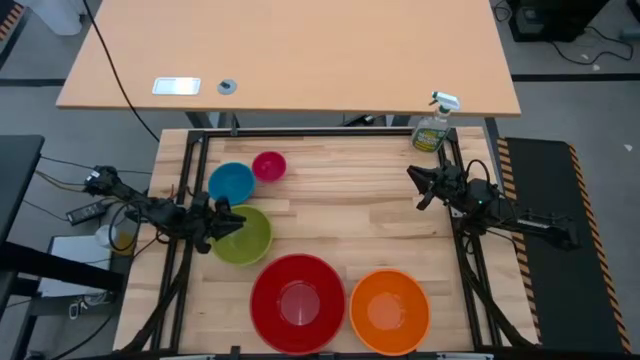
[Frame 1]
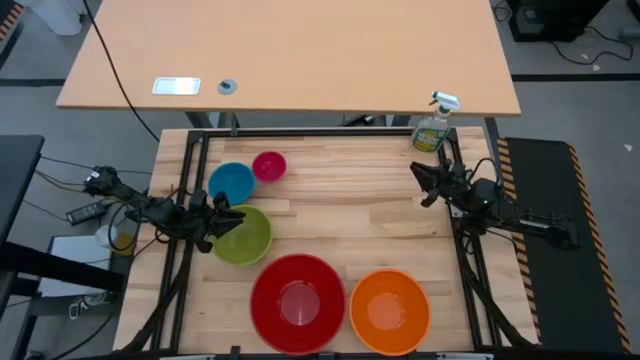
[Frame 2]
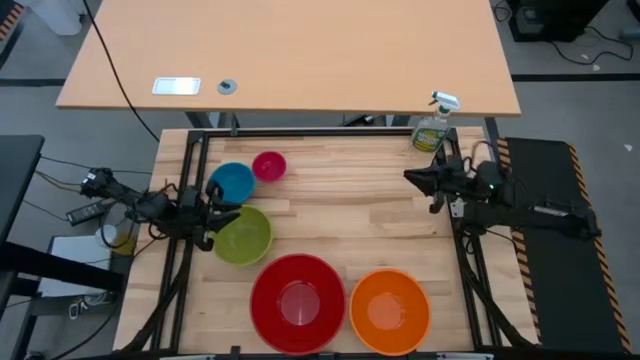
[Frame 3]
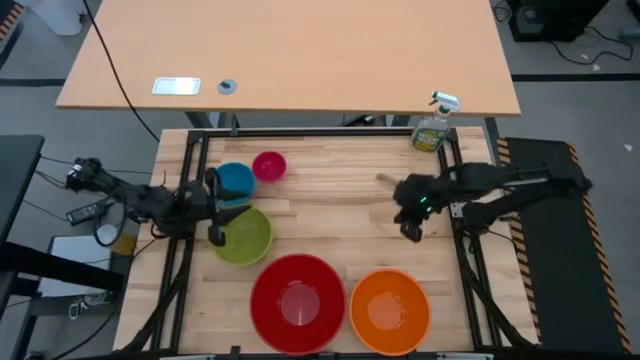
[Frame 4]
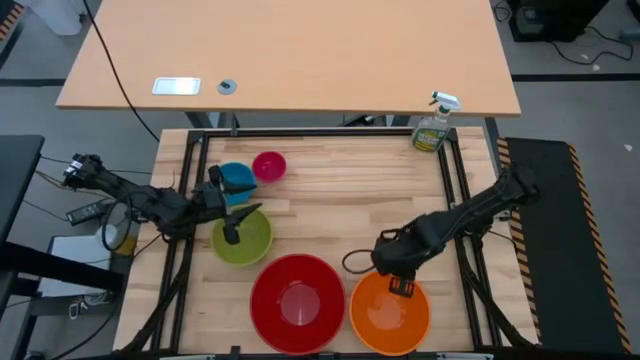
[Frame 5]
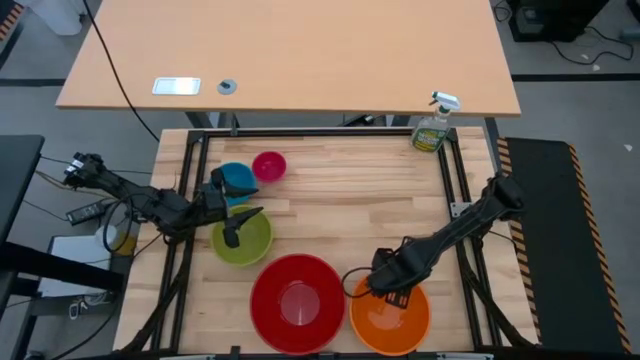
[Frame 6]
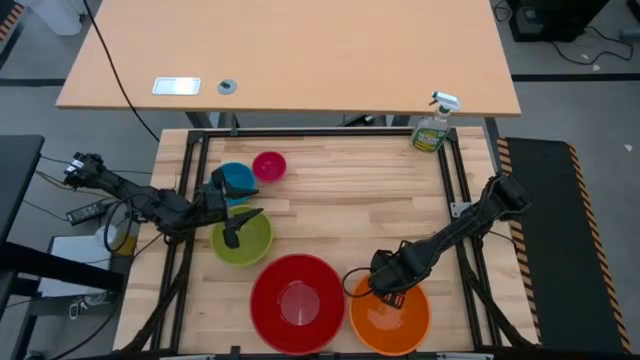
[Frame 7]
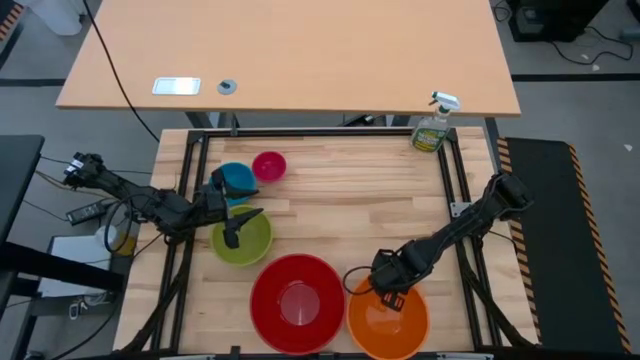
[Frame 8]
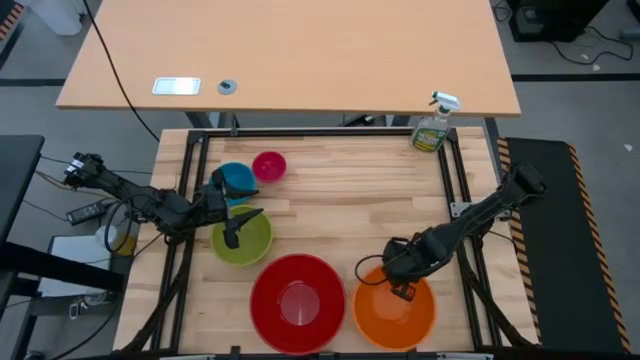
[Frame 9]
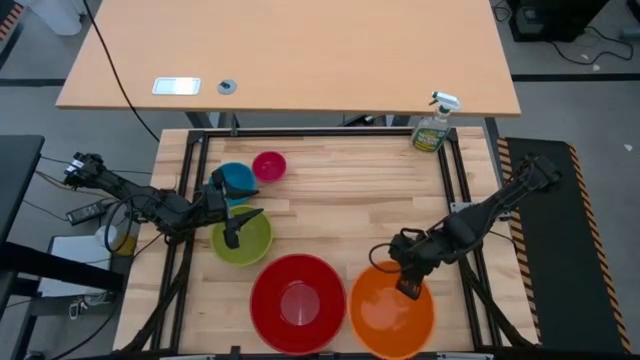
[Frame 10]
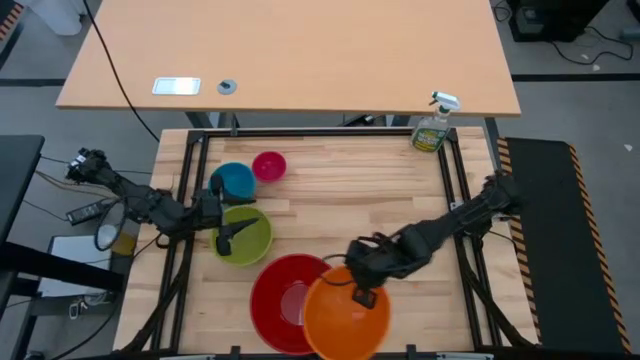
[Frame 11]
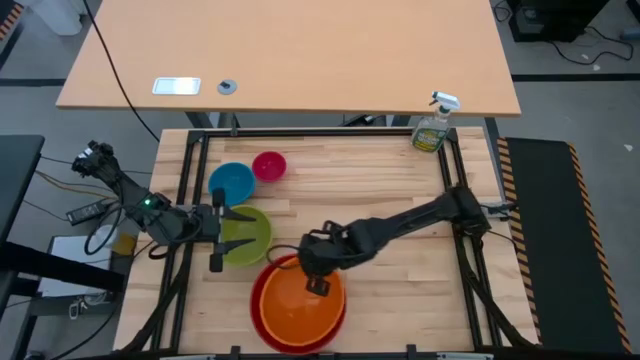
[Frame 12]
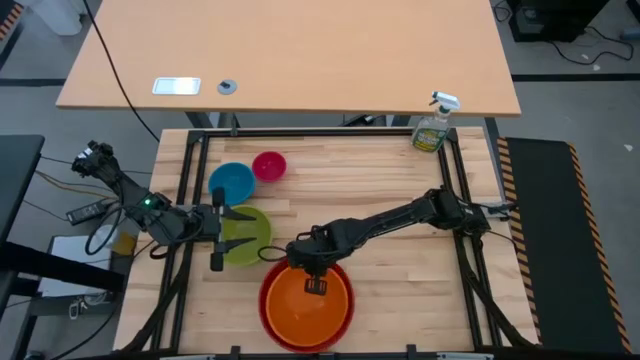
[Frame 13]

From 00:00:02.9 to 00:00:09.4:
Stack the orange bowl into the red bowl

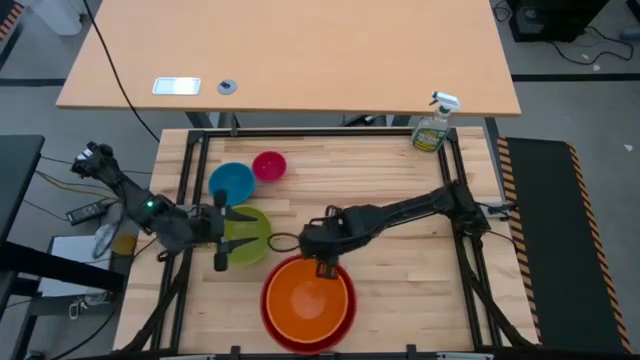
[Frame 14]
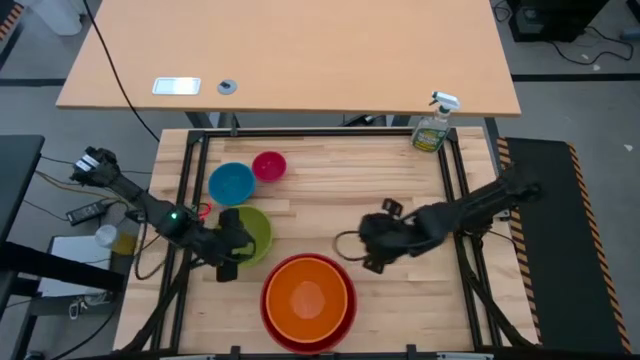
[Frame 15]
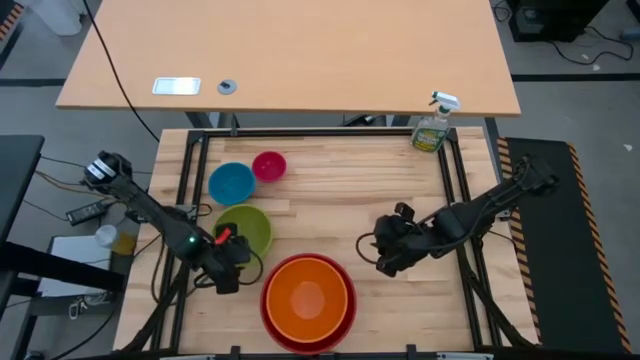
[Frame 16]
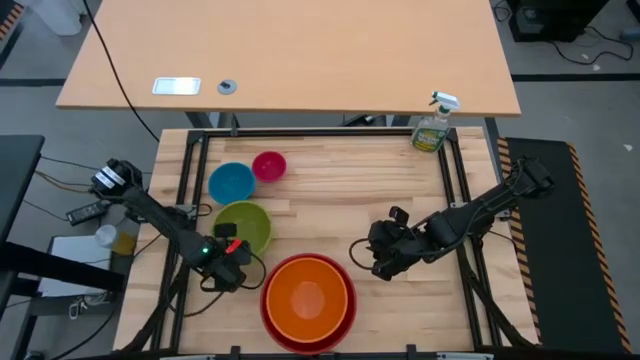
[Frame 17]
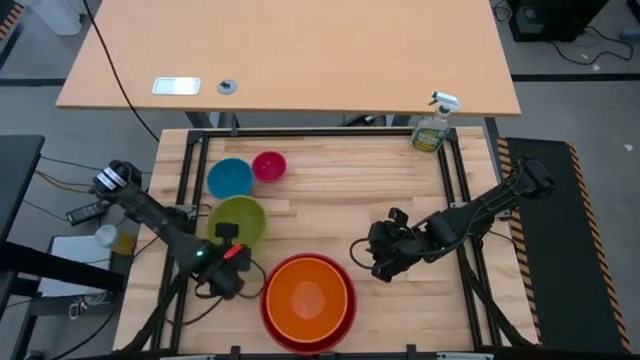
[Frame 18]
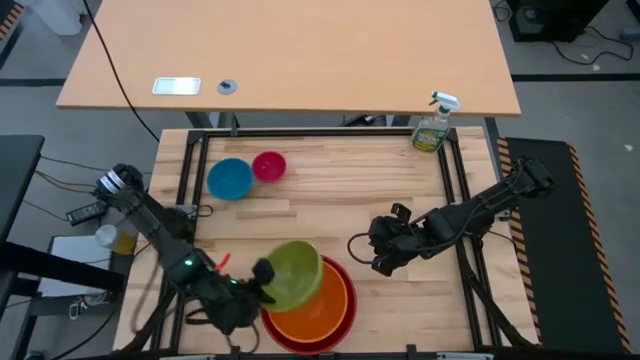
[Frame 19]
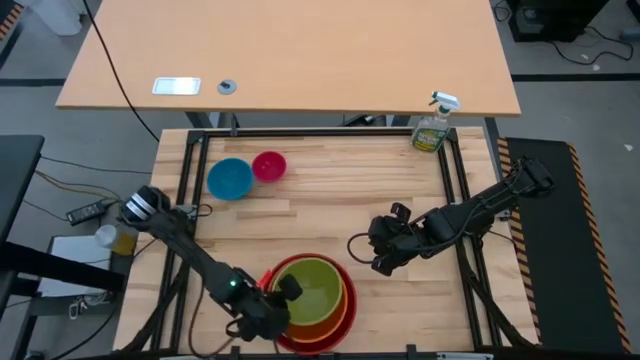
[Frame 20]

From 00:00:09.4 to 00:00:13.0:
Stack the green bowl into the orange bowl

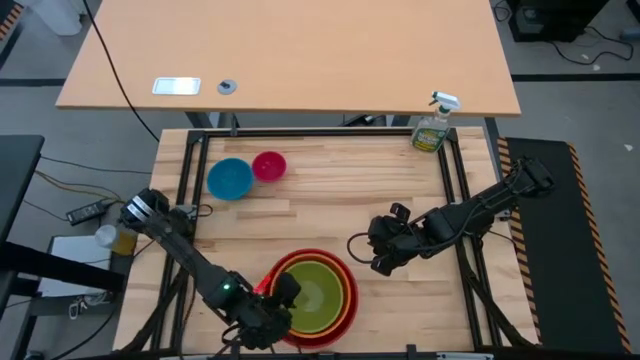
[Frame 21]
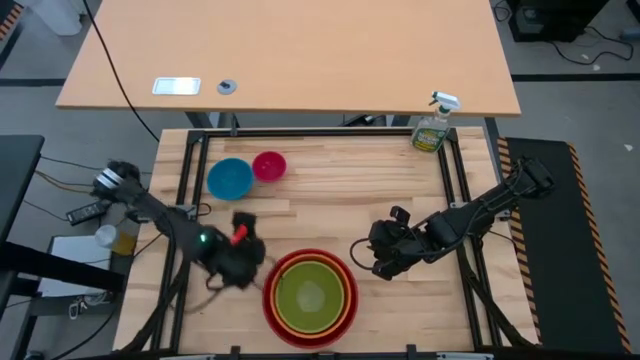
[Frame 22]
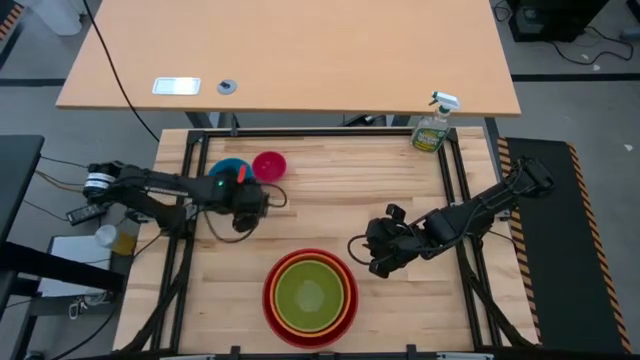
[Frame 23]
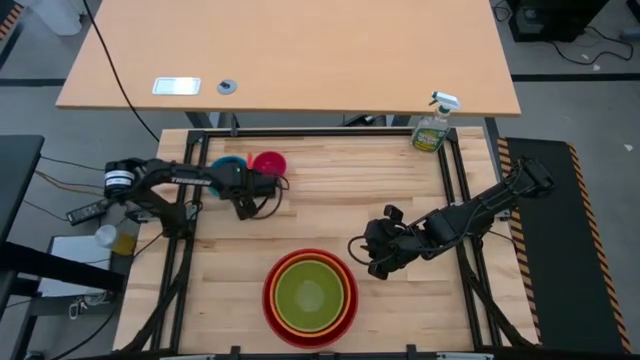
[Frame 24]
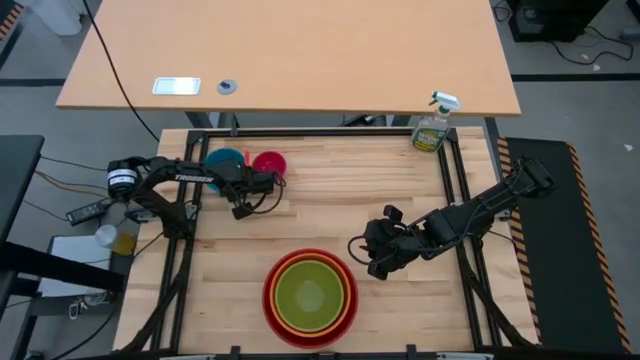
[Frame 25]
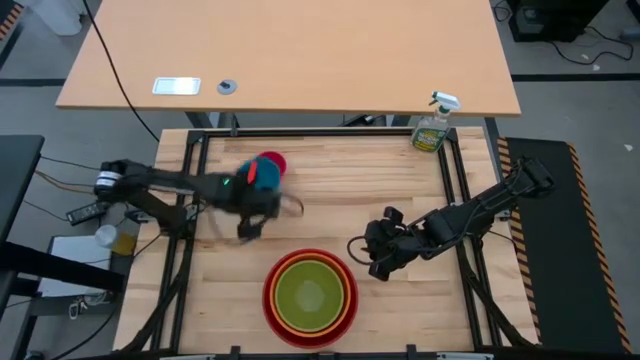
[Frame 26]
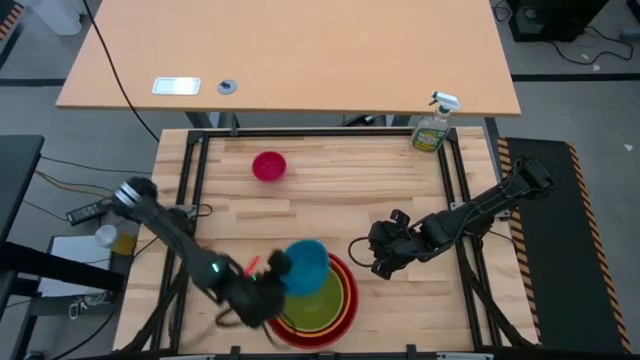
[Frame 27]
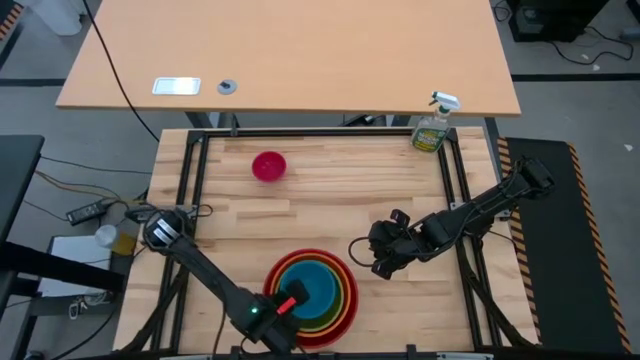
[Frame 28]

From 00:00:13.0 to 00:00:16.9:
Stack the blue bowl into the green bowl

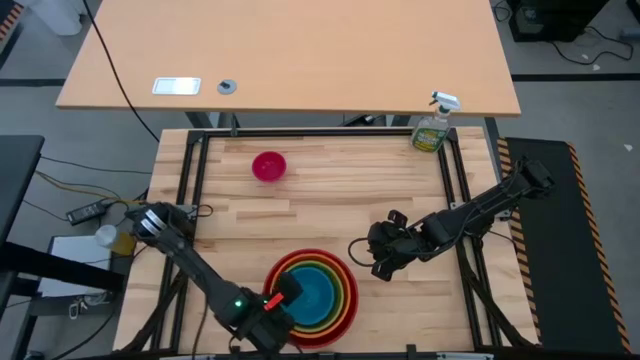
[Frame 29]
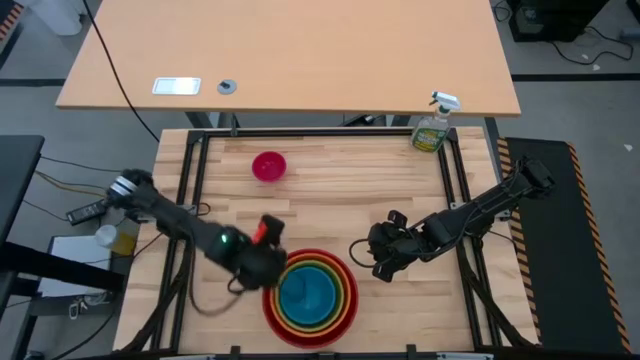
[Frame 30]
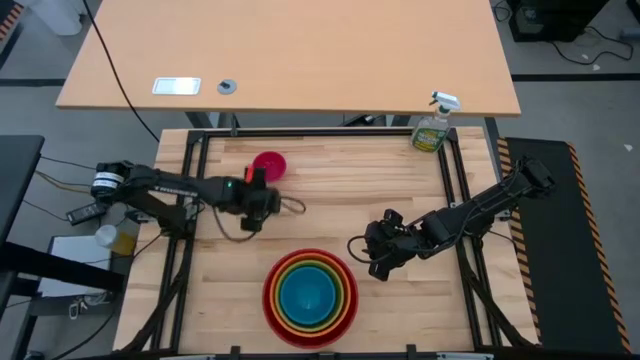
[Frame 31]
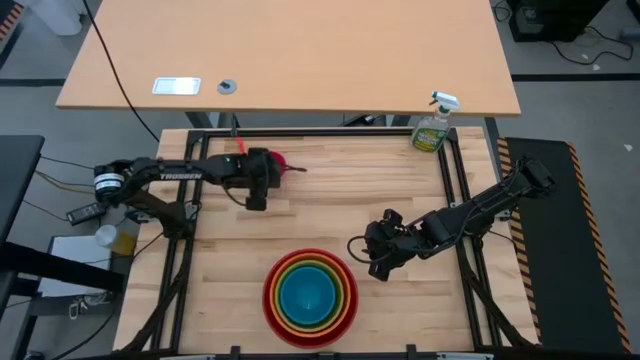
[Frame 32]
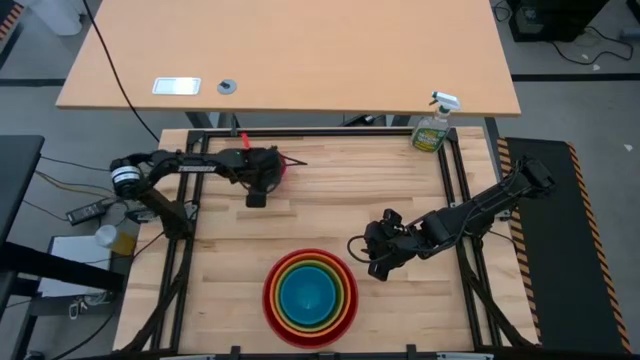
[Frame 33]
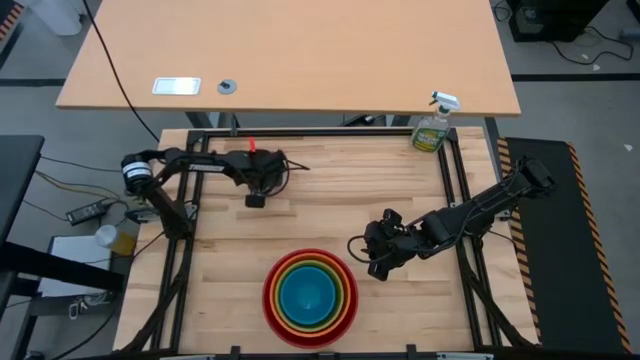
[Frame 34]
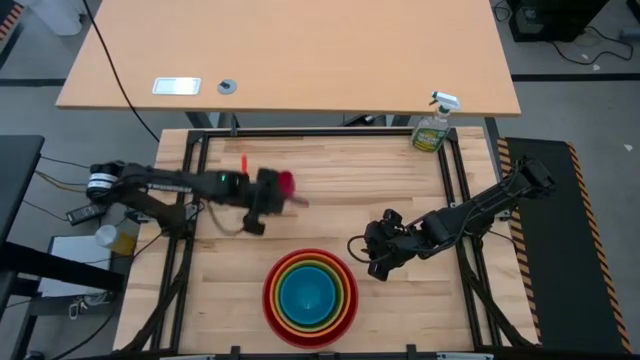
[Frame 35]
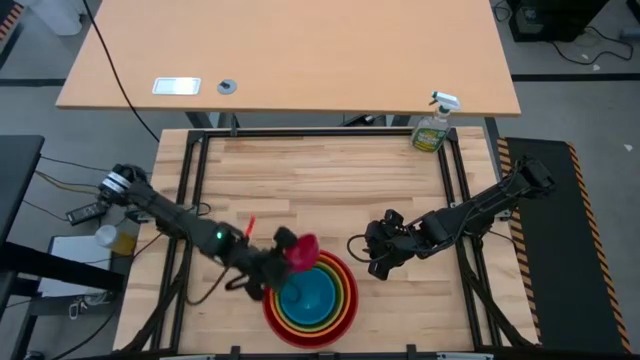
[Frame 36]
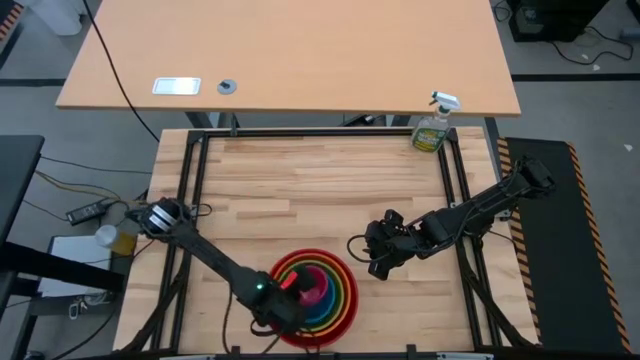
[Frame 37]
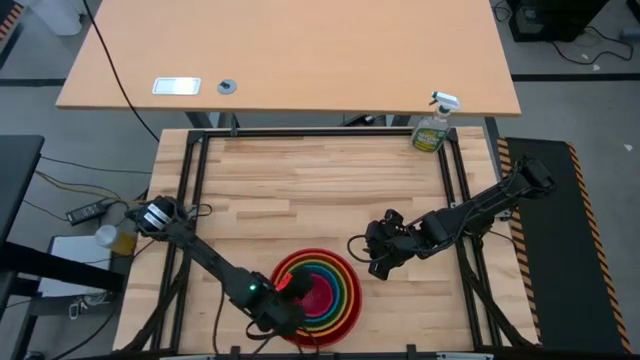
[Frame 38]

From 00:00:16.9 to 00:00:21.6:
Stack the pink bowl into the blue bowl
